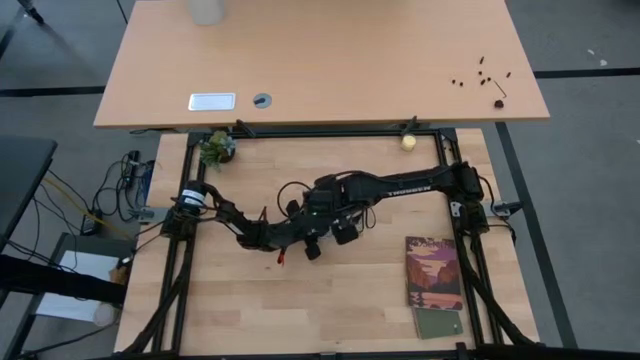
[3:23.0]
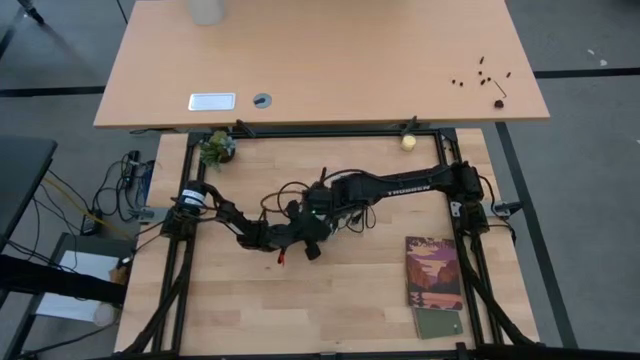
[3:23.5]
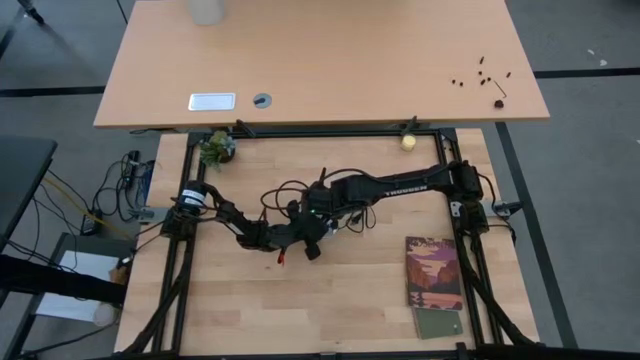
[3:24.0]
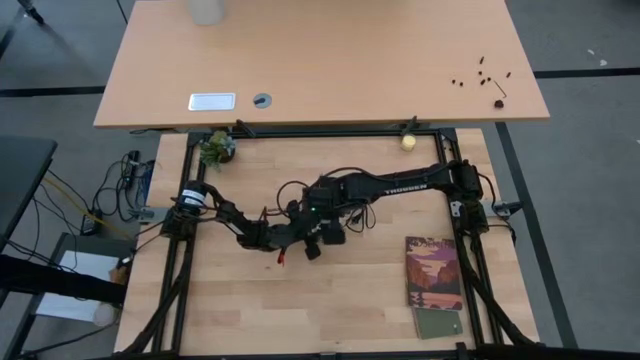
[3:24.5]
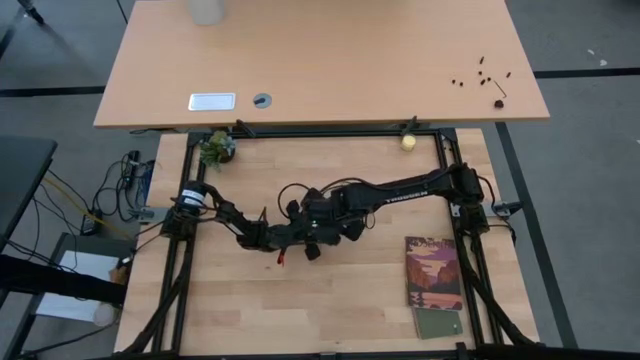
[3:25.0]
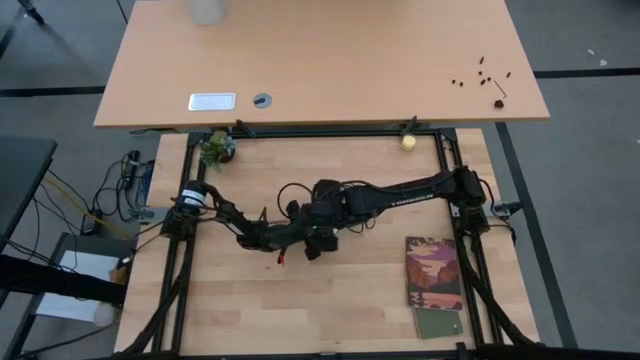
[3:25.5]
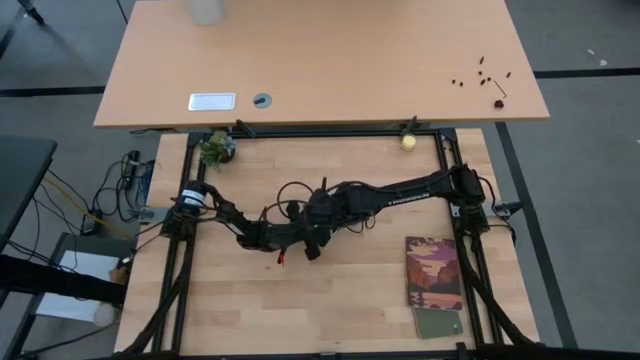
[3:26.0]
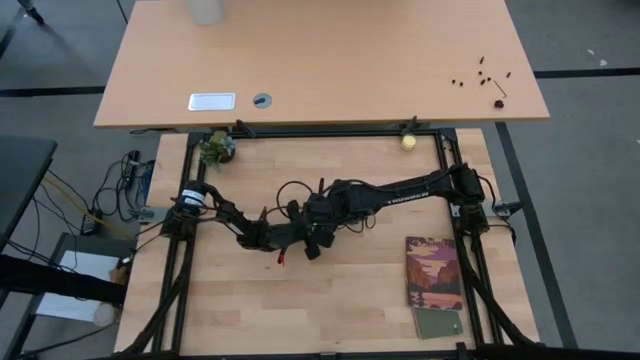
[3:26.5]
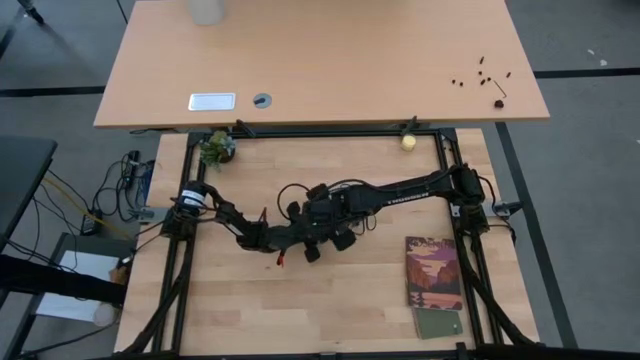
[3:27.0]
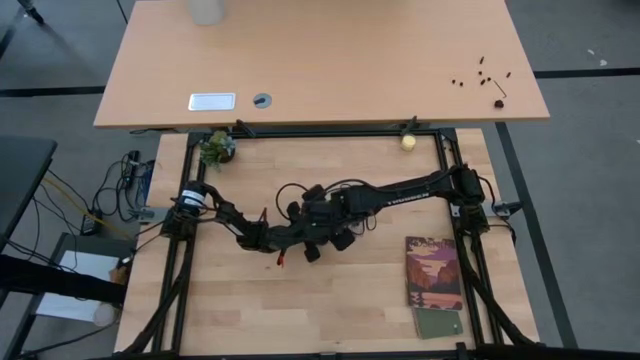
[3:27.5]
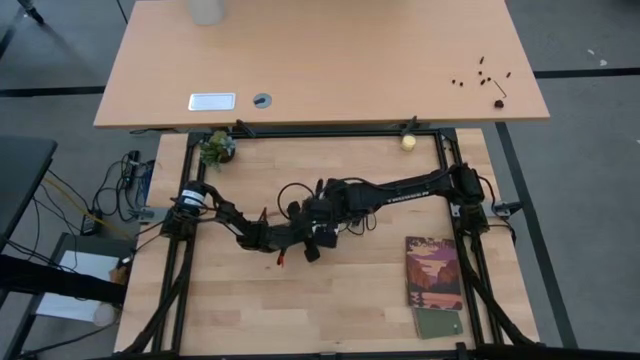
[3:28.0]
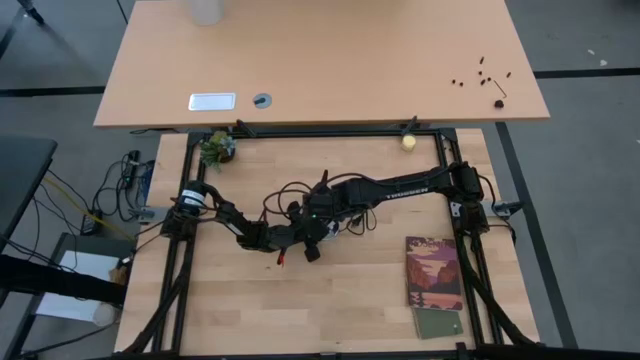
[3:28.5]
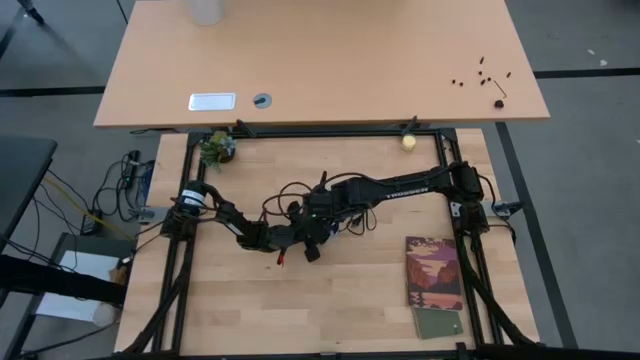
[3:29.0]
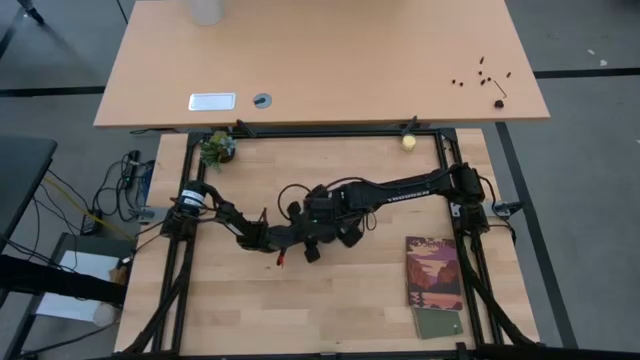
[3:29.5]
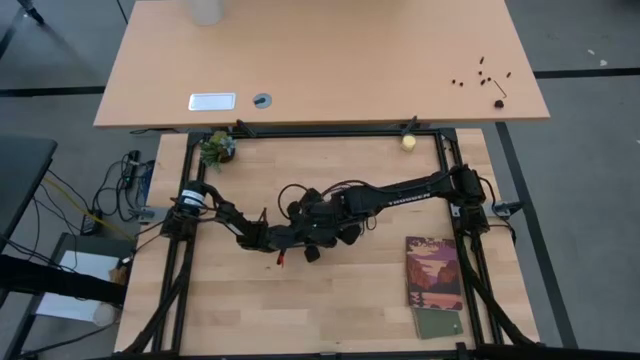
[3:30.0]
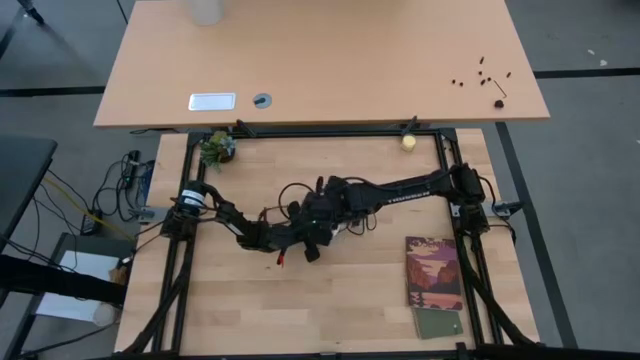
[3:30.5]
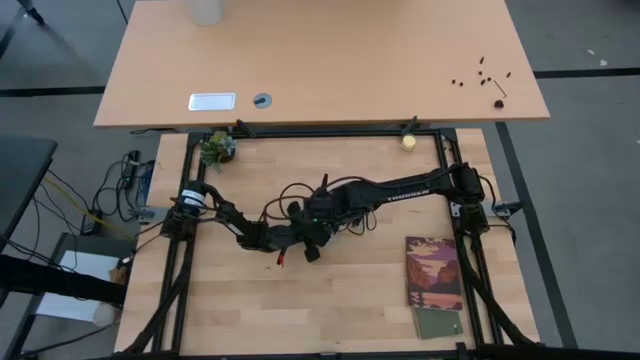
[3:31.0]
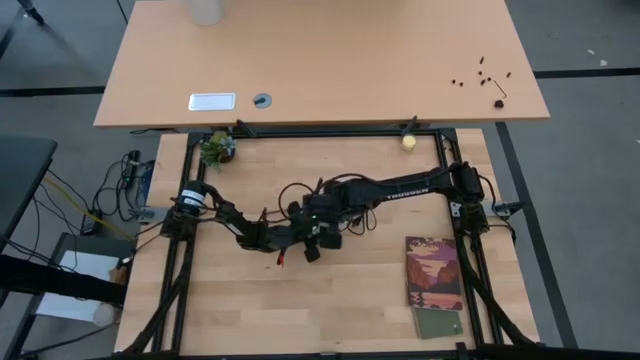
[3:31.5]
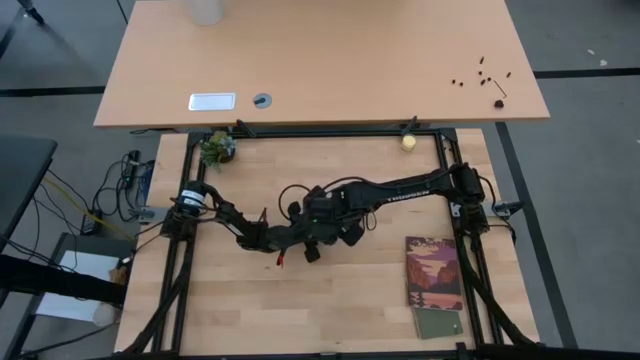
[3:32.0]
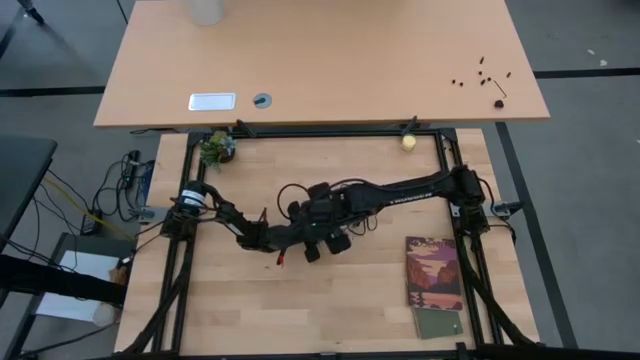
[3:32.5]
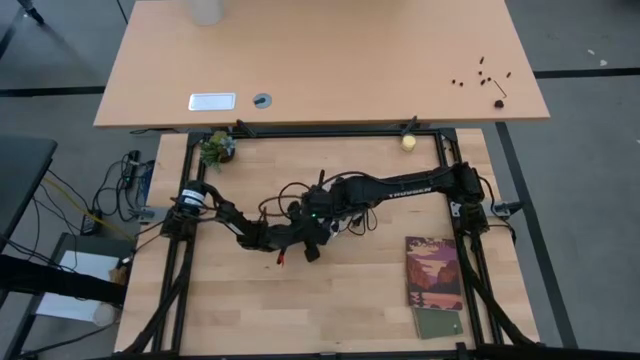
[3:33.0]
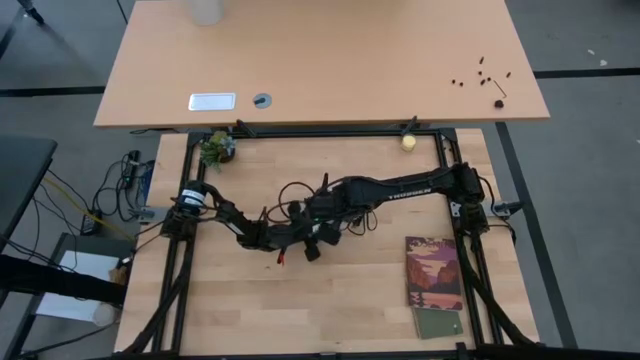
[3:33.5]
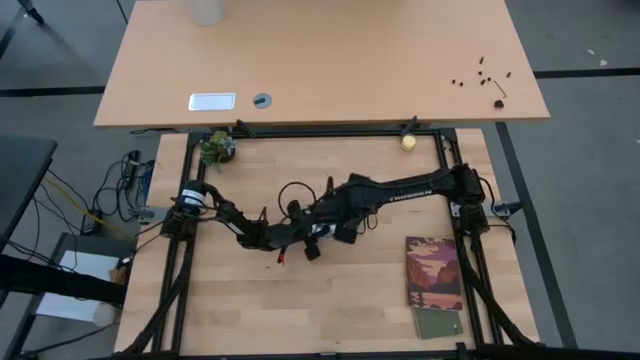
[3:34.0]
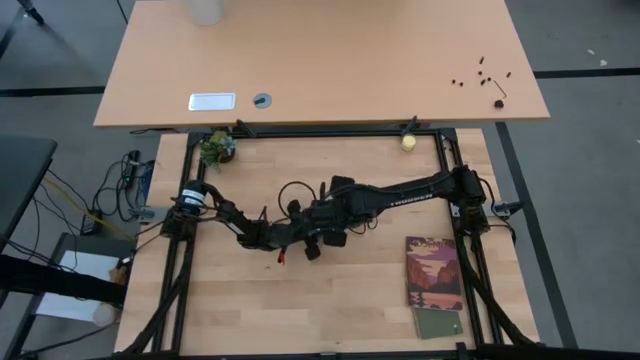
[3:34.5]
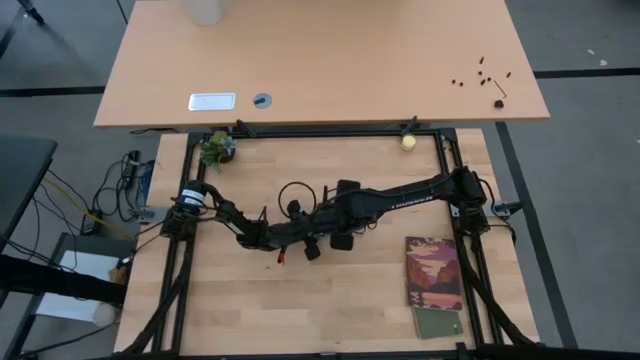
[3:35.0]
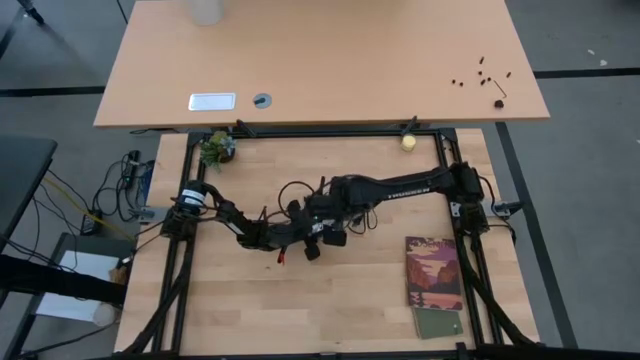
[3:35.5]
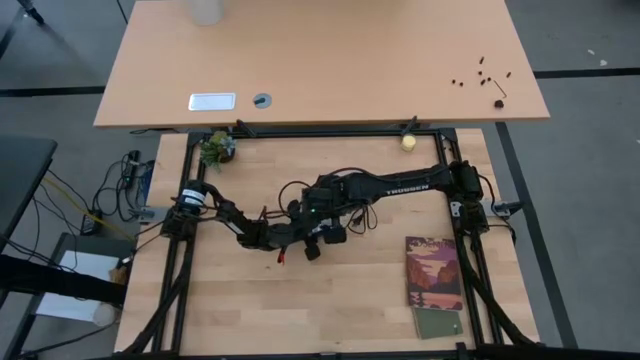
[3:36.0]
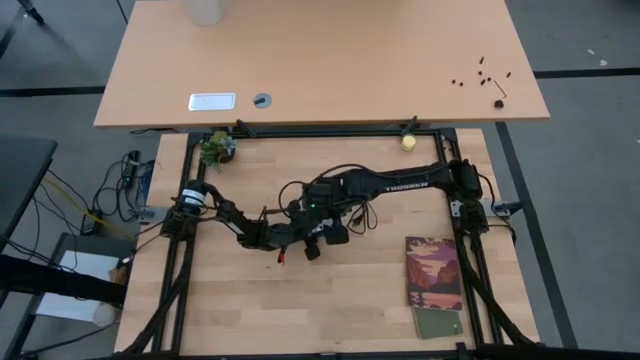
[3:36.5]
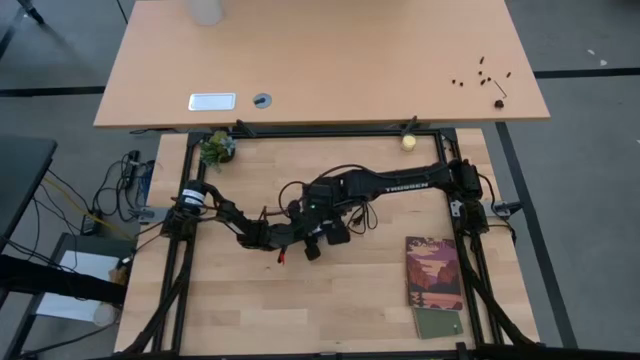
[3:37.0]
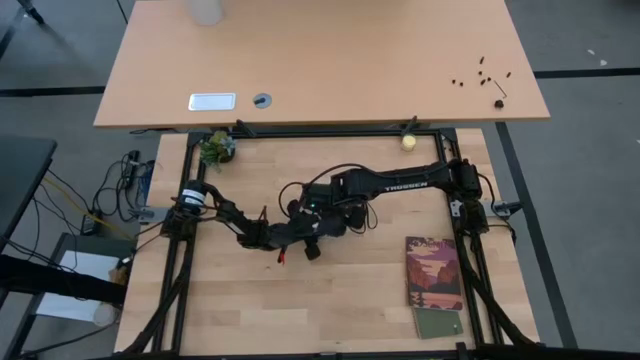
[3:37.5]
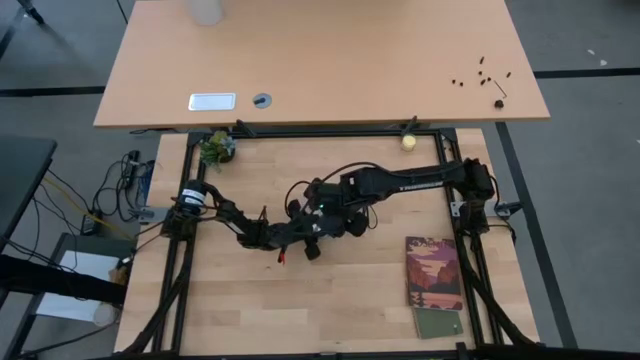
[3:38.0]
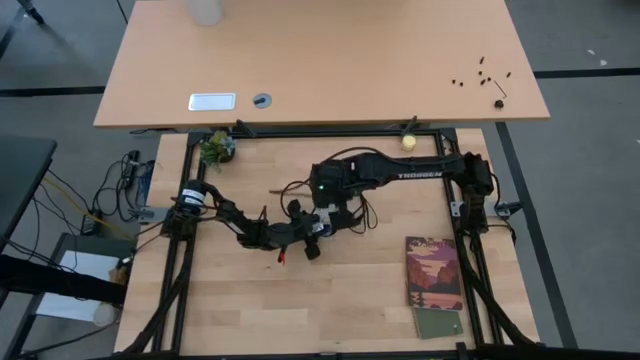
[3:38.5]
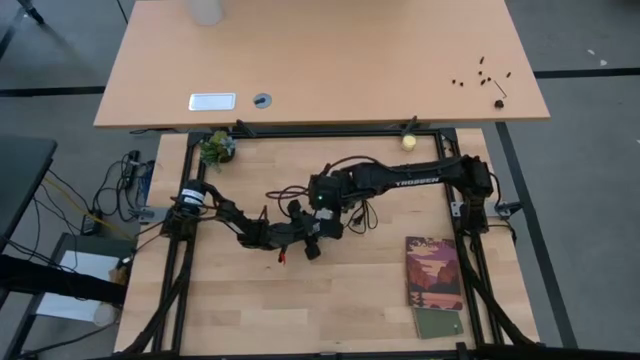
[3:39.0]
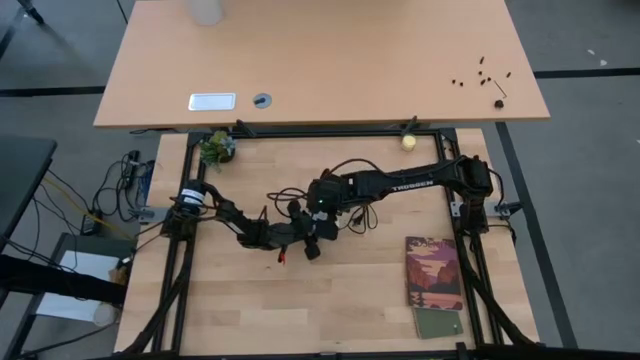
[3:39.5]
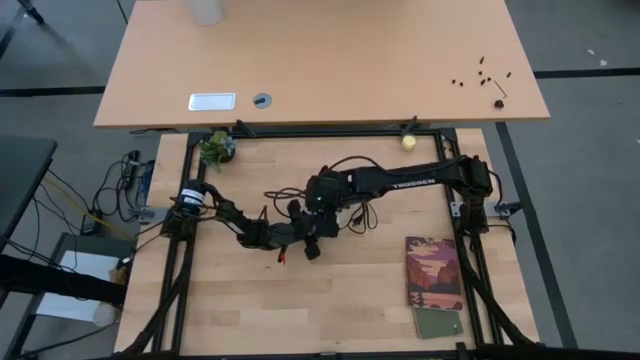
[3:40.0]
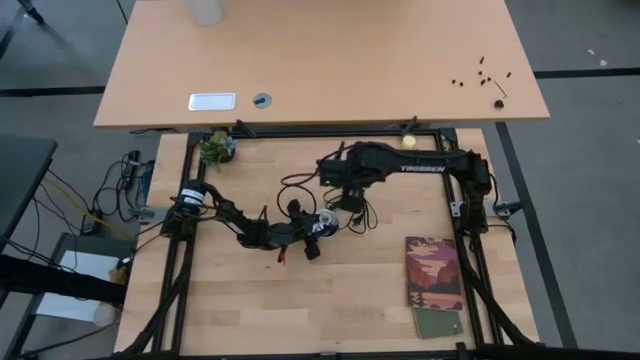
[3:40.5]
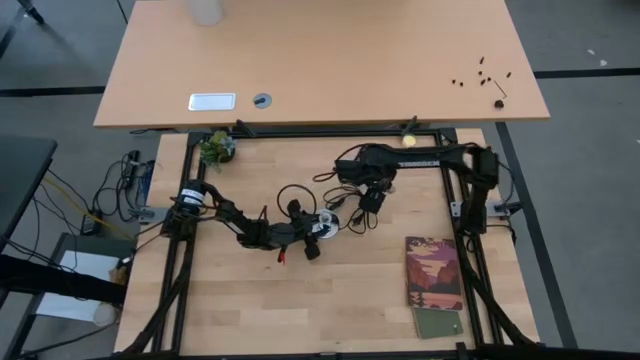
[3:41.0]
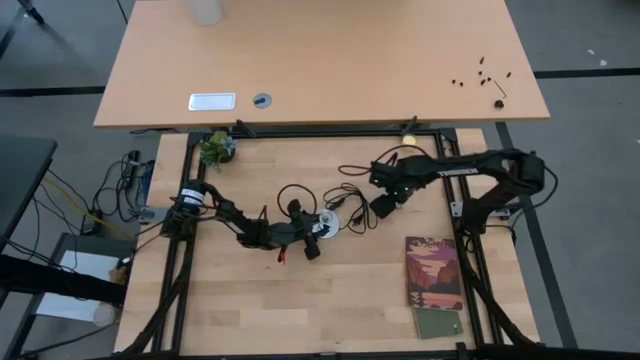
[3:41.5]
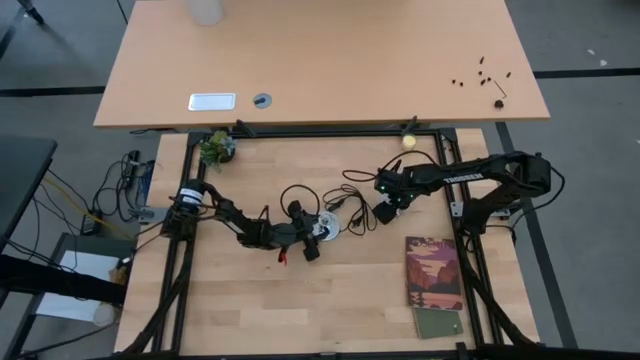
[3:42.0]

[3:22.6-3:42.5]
Task: Screw lightbulb
Remove the white lightbulb from the silver lamp
